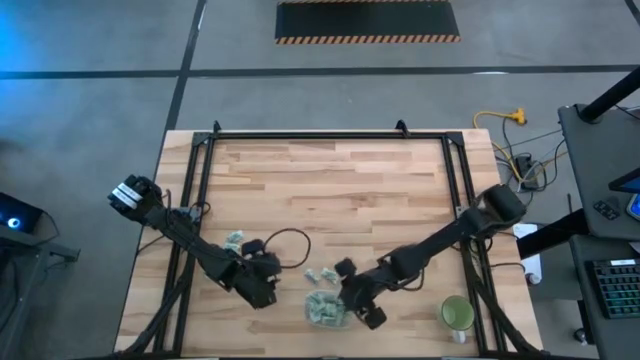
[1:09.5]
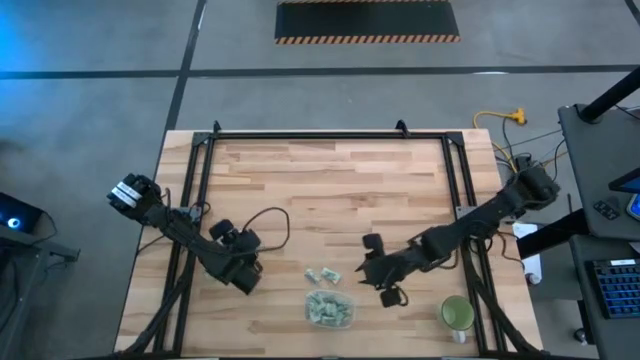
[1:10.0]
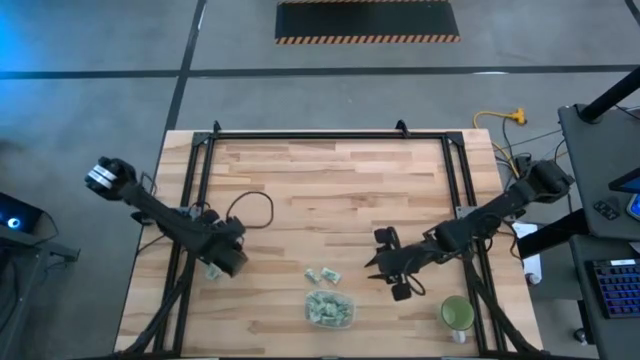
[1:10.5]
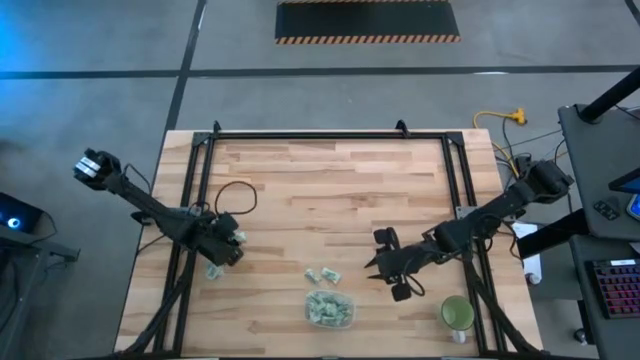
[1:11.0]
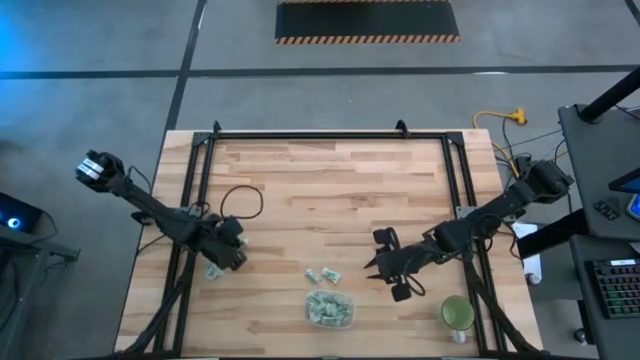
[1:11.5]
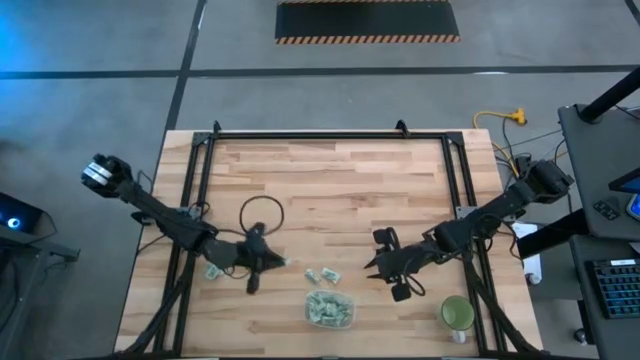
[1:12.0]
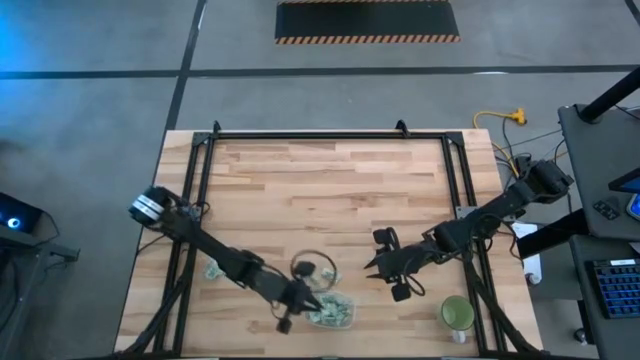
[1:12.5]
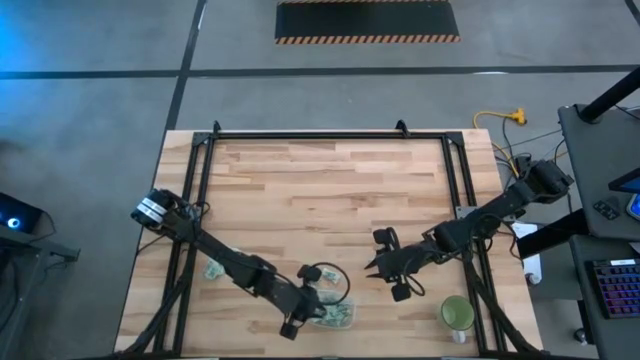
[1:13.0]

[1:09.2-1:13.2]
Task: Pick and place Stevia / Truvia into bins
Put the stevia packet into the transparent container

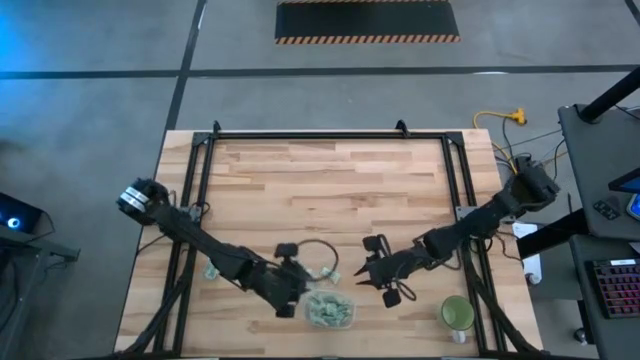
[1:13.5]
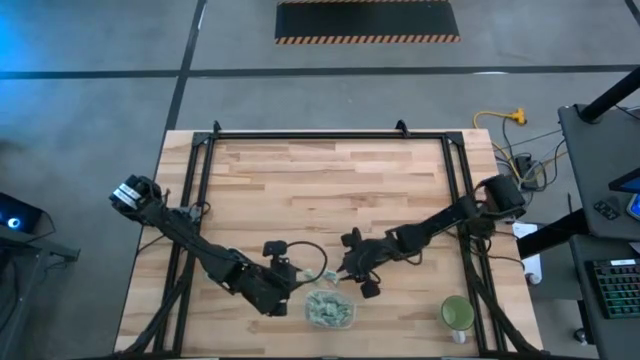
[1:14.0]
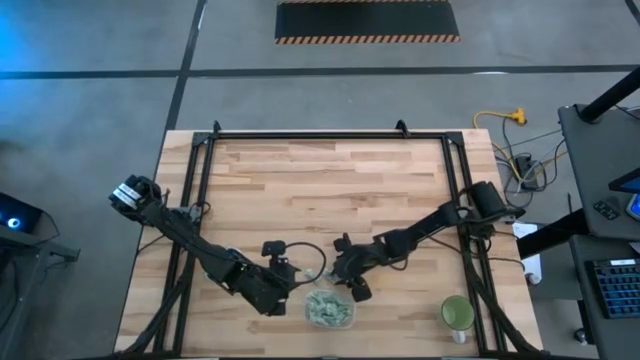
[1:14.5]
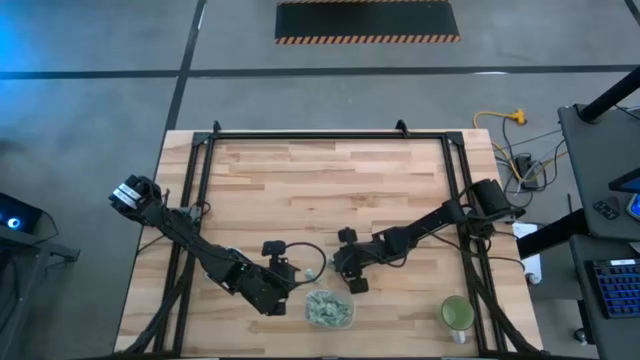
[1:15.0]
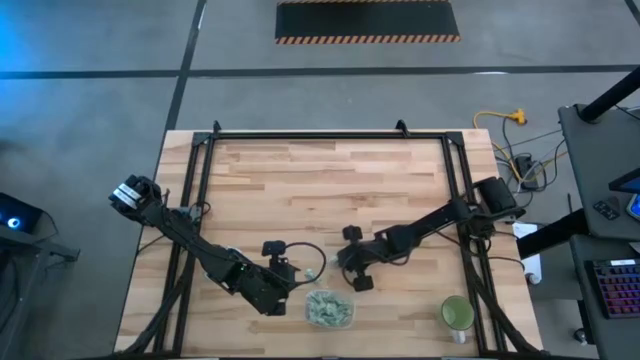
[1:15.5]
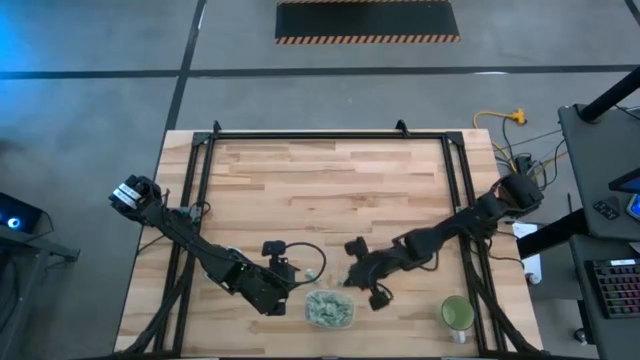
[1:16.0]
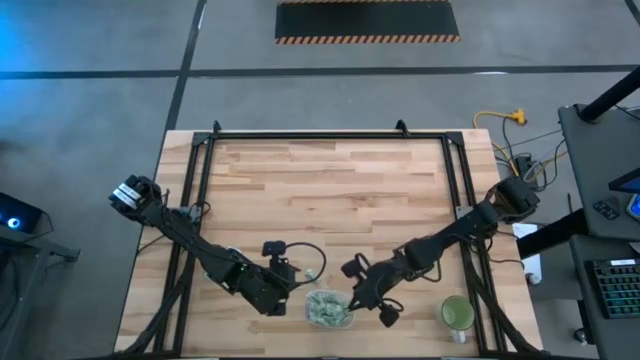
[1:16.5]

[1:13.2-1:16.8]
Put the stevia packet into the transparent container

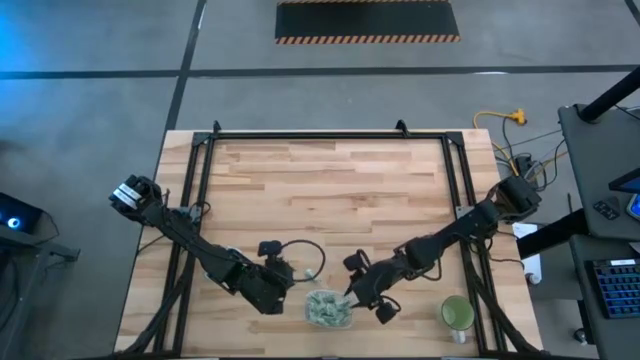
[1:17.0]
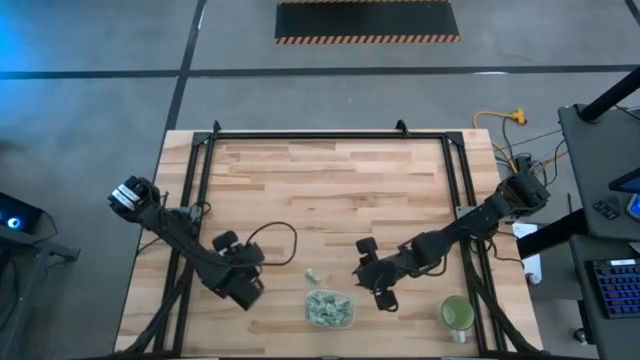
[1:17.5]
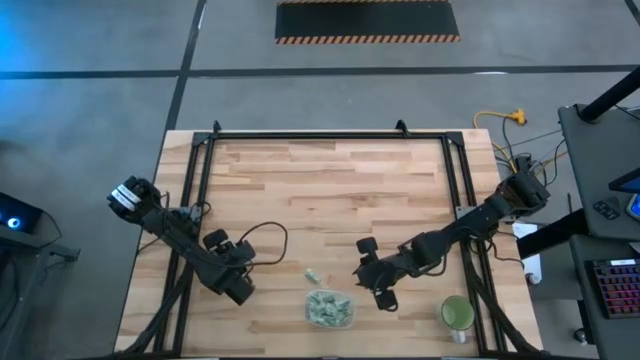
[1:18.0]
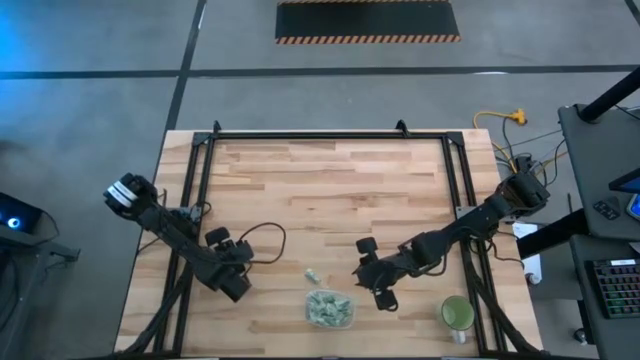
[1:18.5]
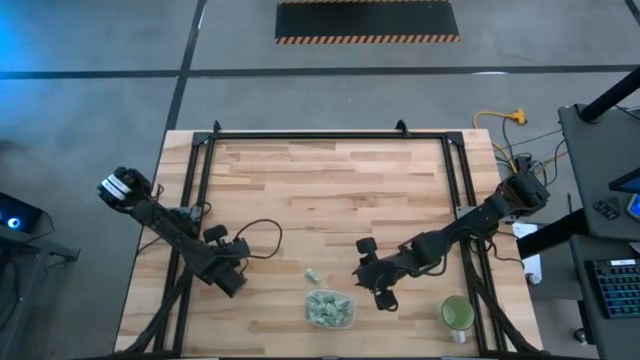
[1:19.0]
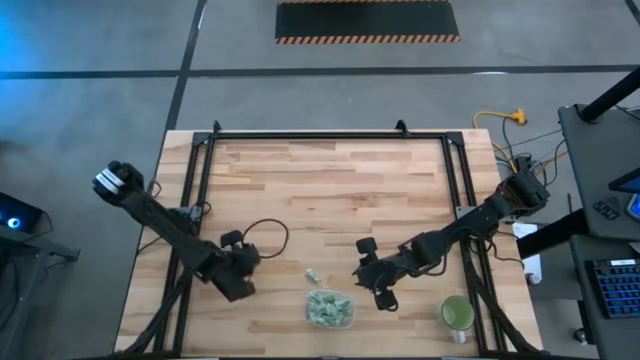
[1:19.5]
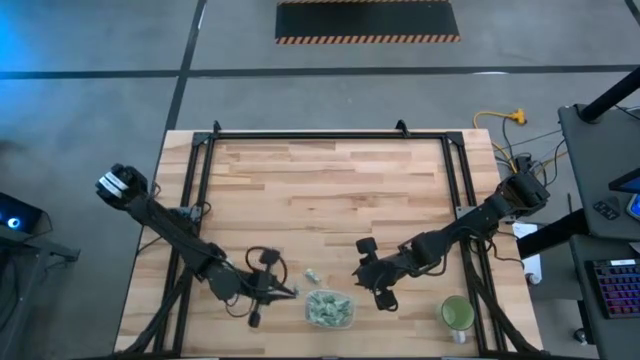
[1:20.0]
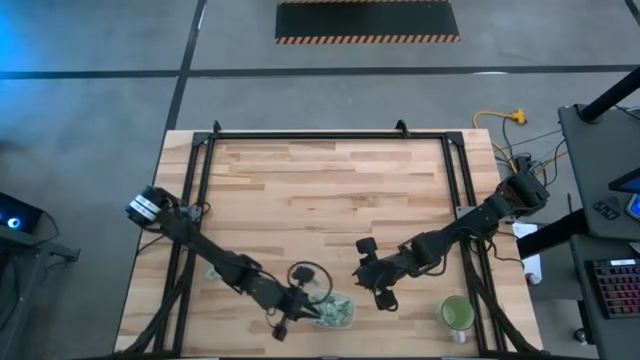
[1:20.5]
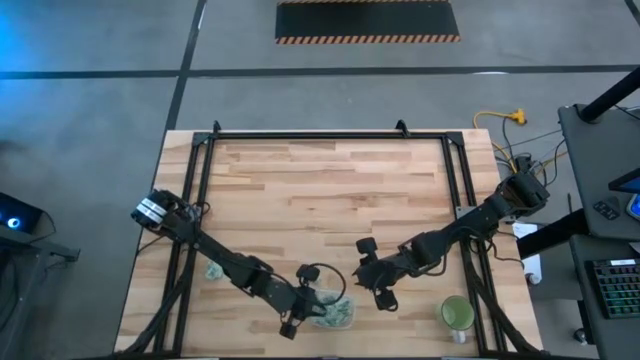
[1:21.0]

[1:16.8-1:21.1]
Put the stevia packet into the transparent container

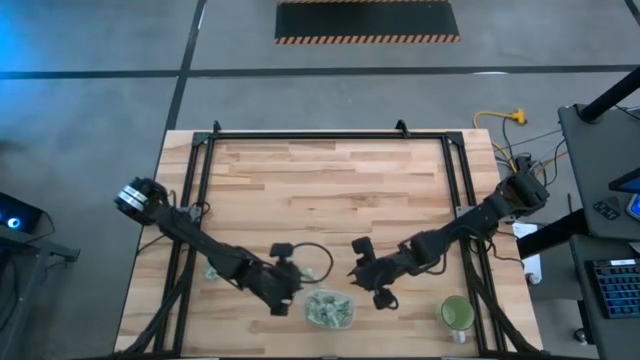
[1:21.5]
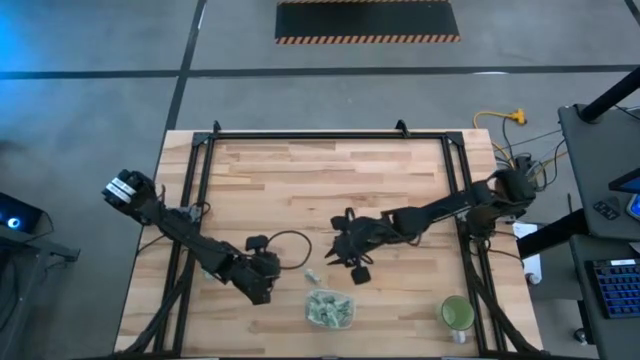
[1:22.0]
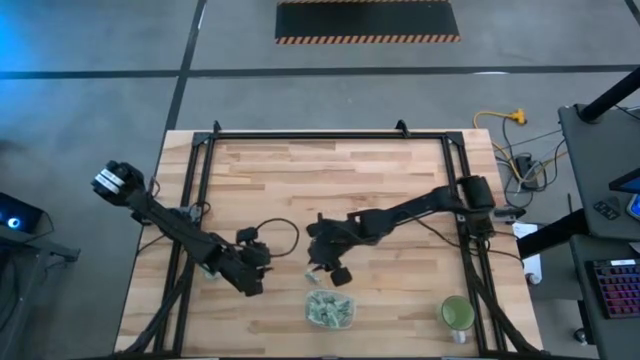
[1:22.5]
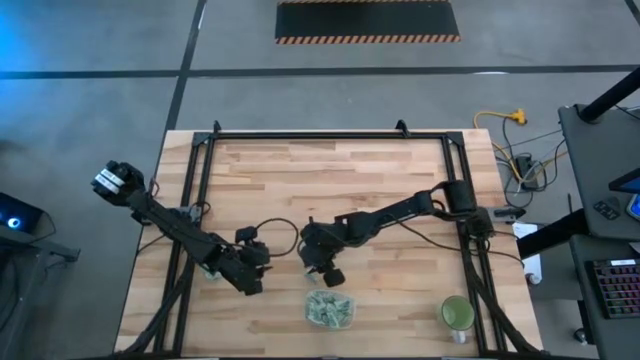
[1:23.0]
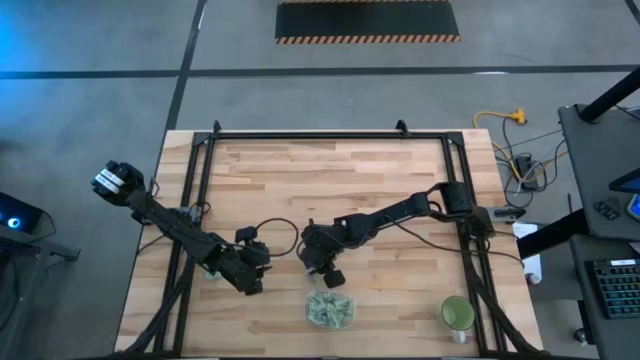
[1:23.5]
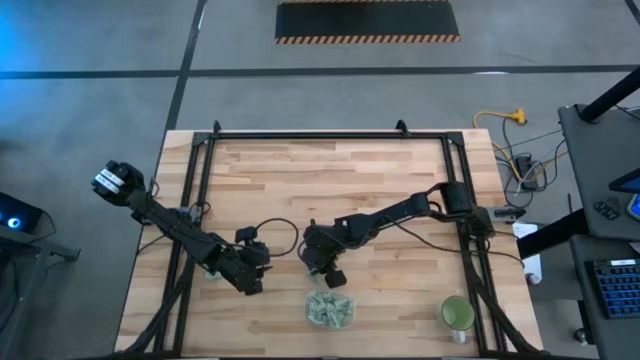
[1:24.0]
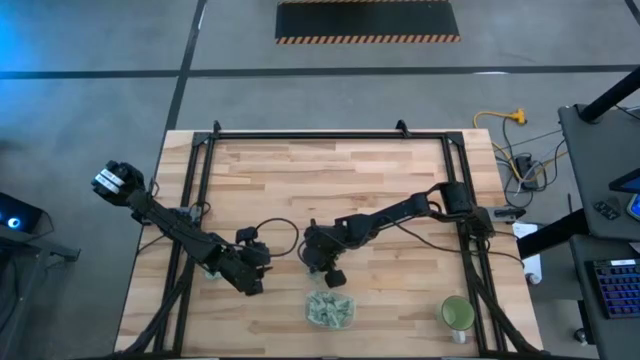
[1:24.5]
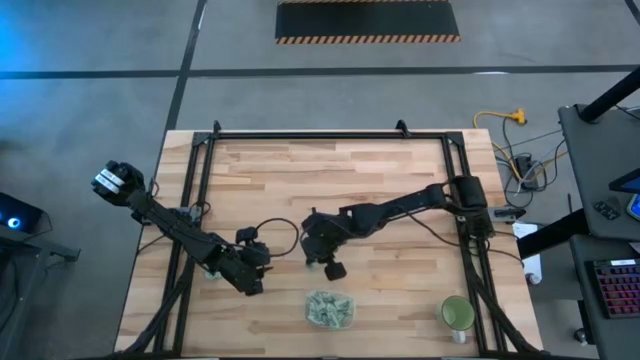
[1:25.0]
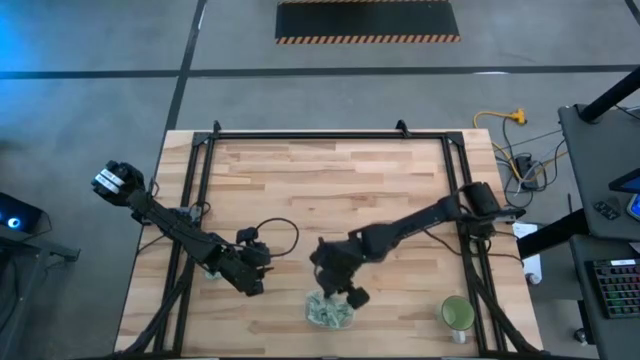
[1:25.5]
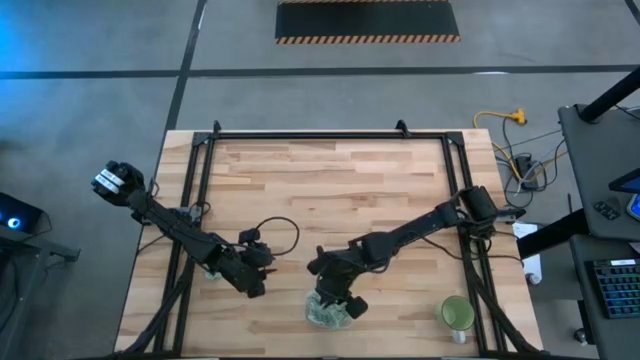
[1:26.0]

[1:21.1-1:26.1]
Put the stevia packet into the transparent container

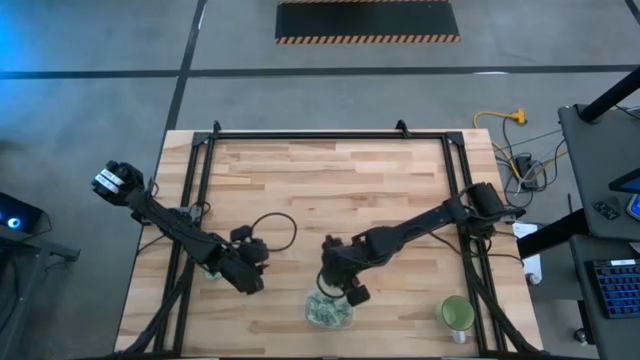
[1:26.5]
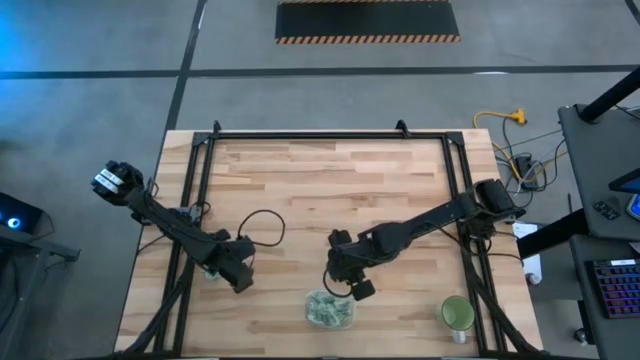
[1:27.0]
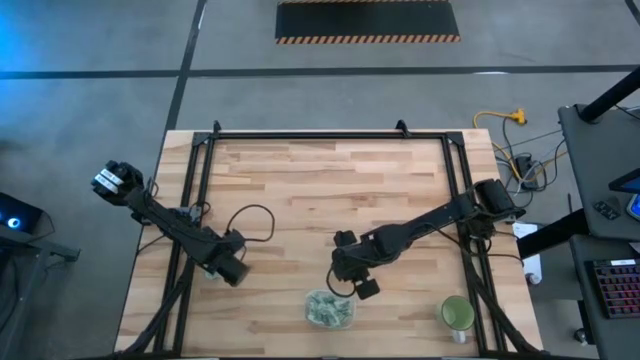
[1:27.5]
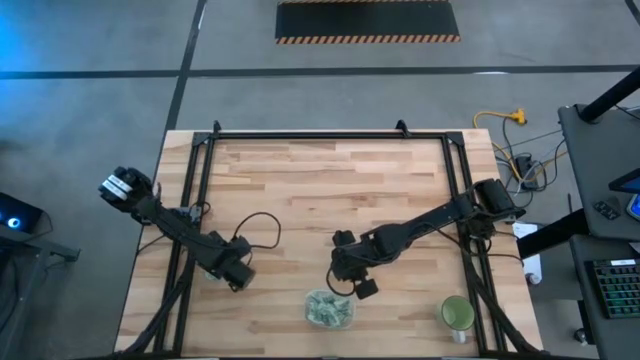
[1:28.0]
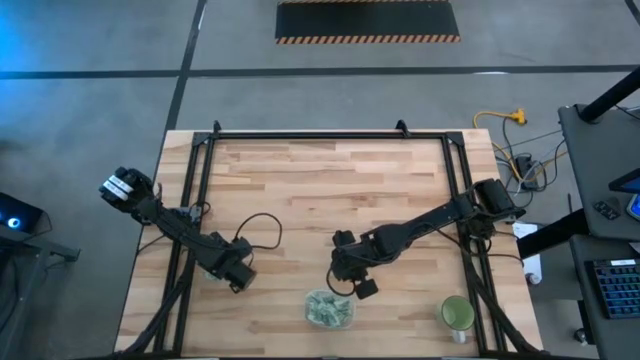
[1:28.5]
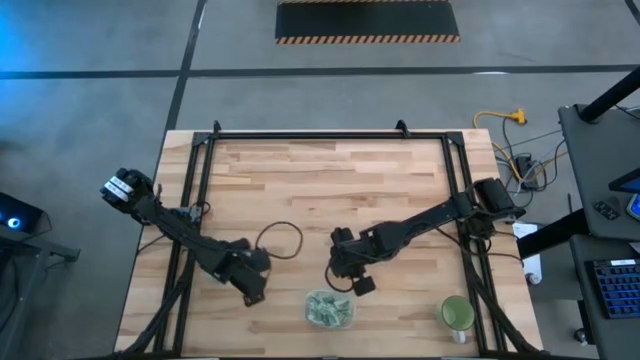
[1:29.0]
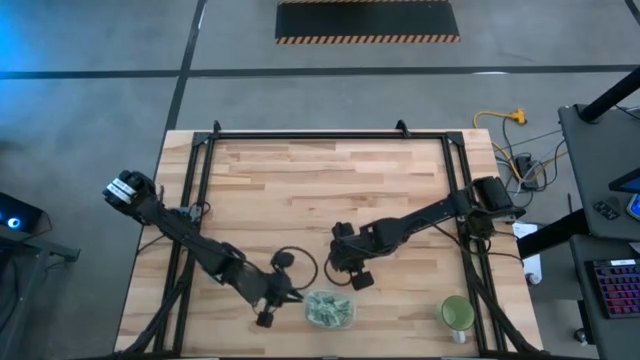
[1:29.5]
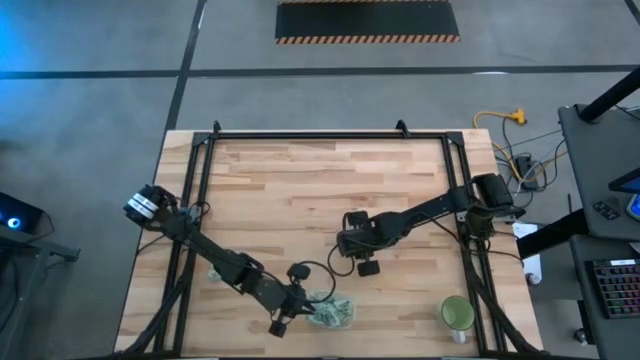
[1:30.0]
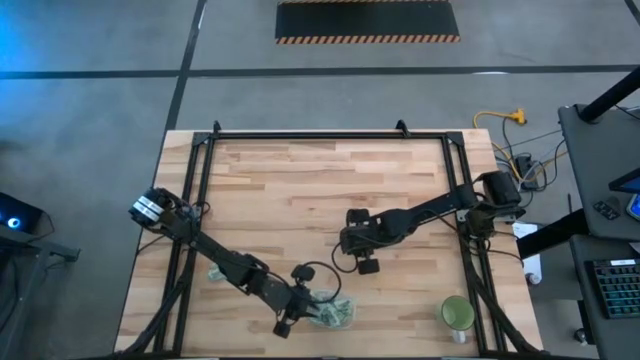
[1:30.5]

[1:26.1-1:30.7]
Put the stevia packet into the transparent container
